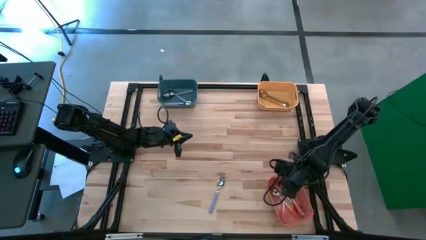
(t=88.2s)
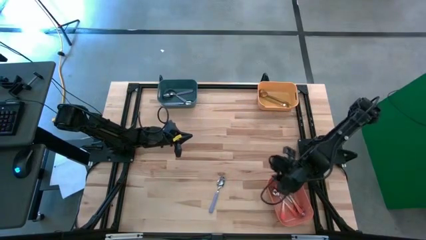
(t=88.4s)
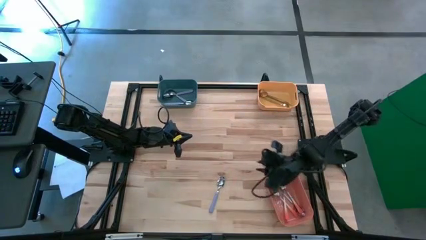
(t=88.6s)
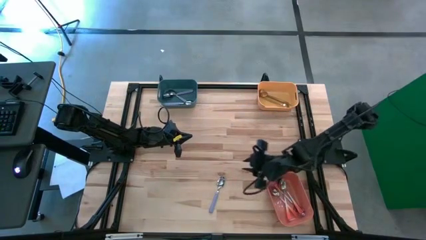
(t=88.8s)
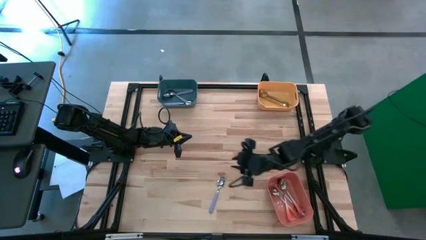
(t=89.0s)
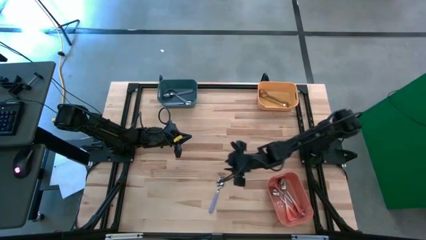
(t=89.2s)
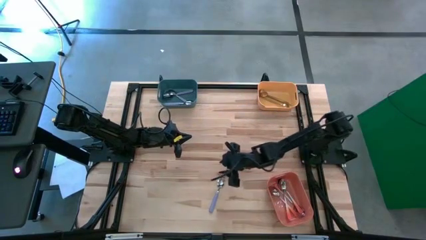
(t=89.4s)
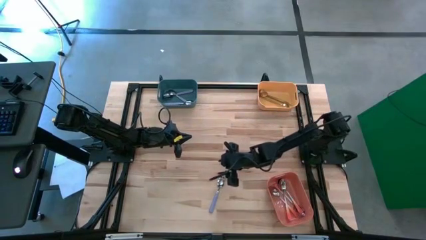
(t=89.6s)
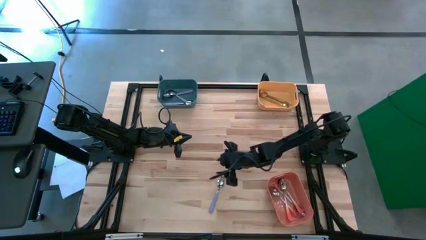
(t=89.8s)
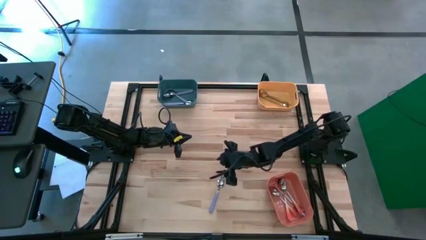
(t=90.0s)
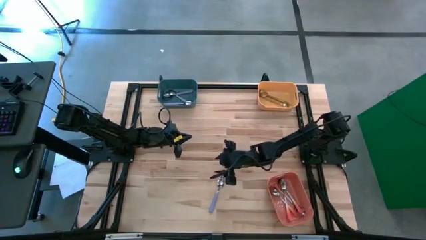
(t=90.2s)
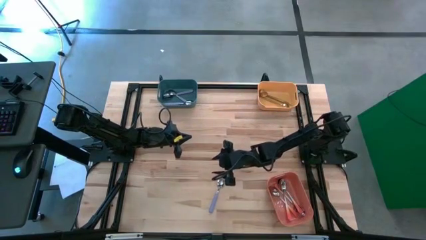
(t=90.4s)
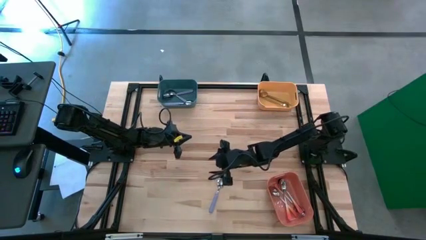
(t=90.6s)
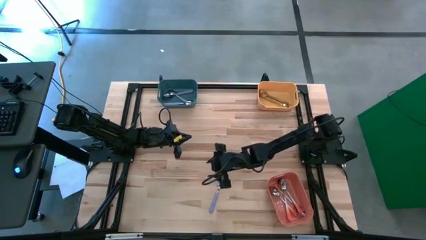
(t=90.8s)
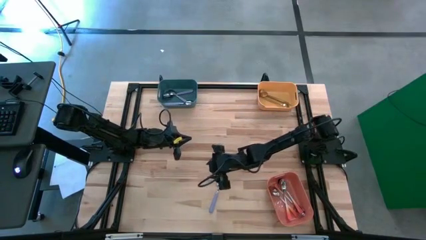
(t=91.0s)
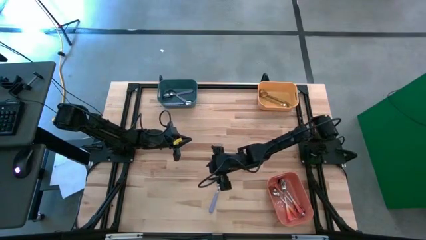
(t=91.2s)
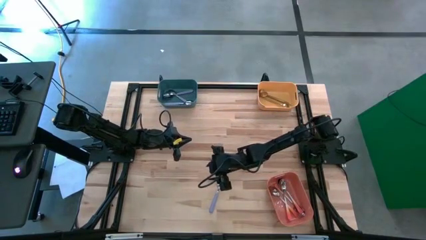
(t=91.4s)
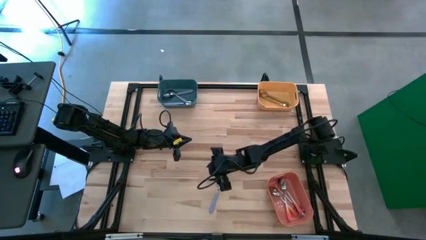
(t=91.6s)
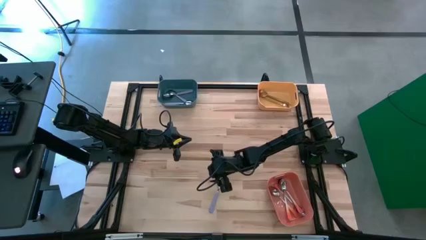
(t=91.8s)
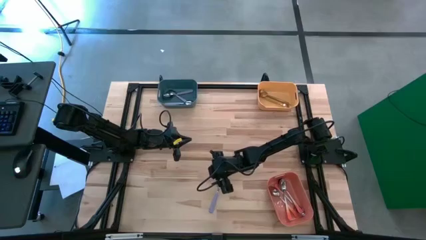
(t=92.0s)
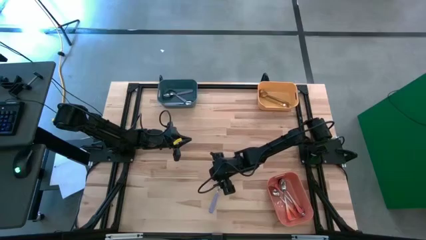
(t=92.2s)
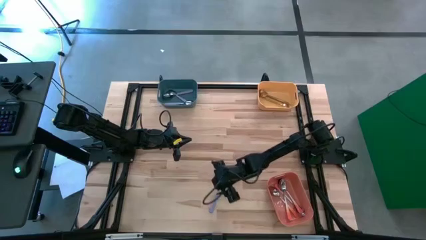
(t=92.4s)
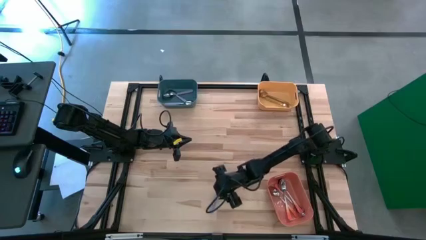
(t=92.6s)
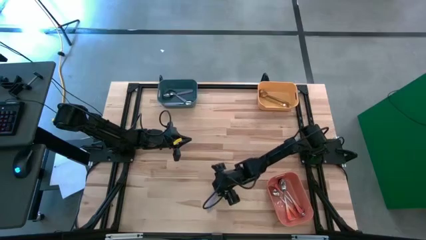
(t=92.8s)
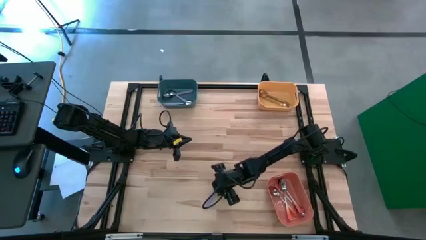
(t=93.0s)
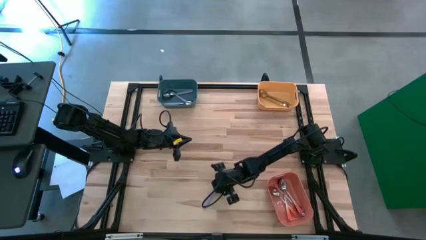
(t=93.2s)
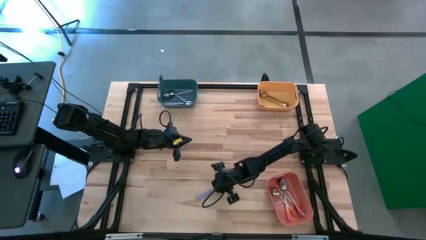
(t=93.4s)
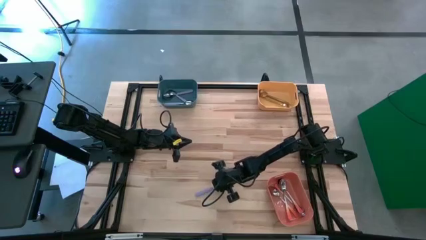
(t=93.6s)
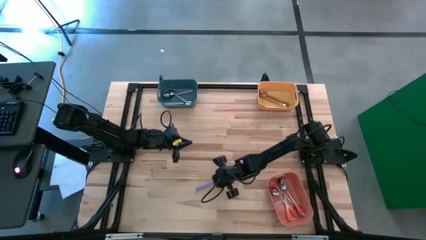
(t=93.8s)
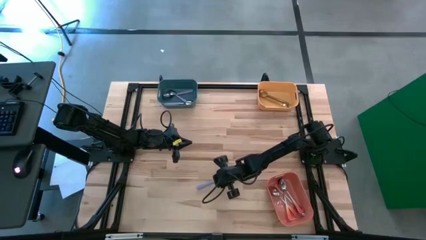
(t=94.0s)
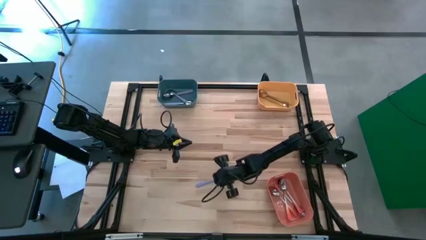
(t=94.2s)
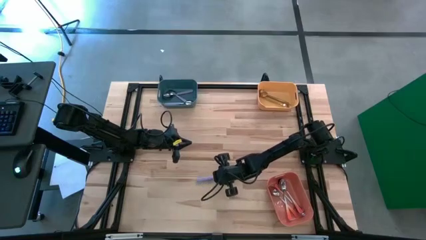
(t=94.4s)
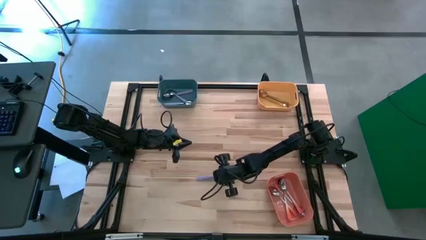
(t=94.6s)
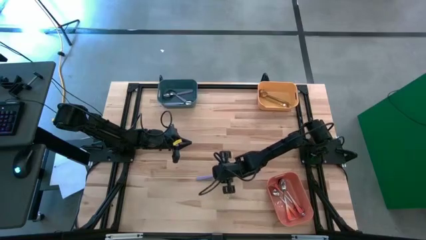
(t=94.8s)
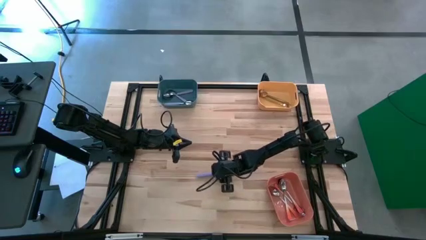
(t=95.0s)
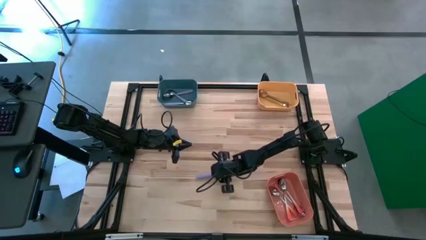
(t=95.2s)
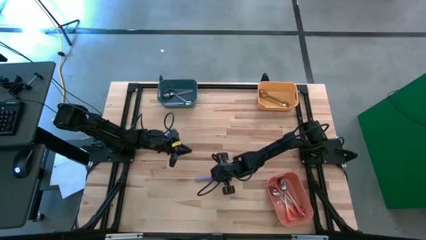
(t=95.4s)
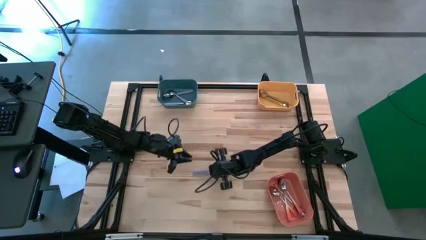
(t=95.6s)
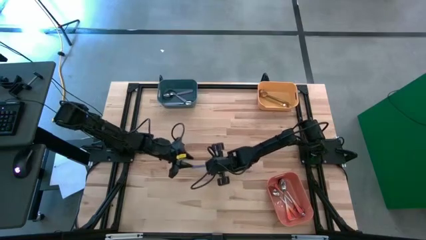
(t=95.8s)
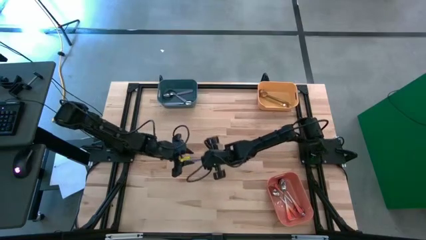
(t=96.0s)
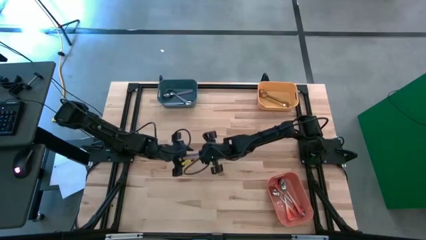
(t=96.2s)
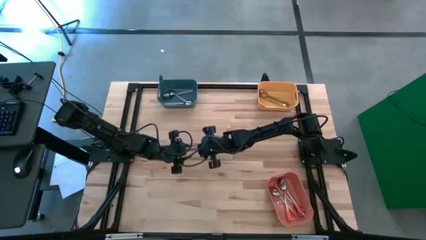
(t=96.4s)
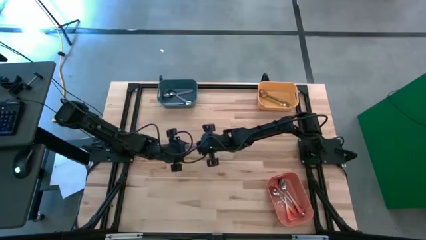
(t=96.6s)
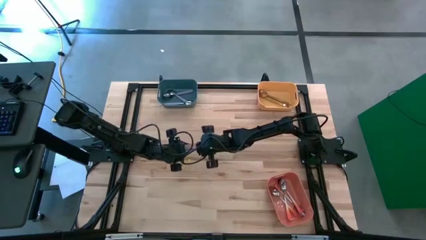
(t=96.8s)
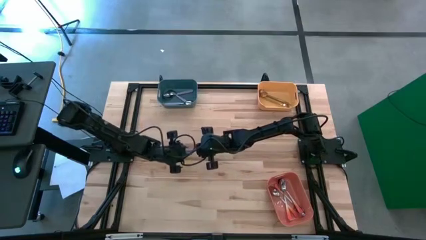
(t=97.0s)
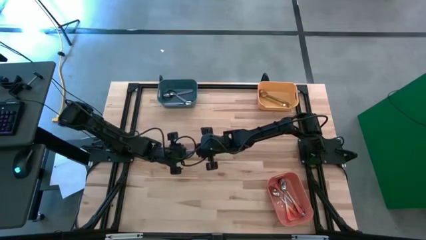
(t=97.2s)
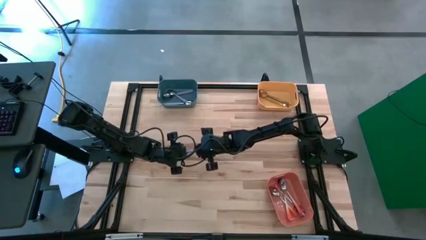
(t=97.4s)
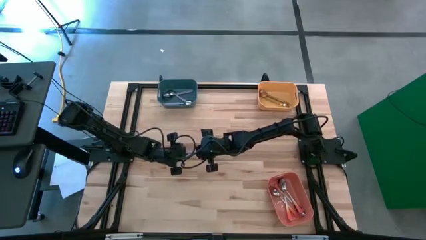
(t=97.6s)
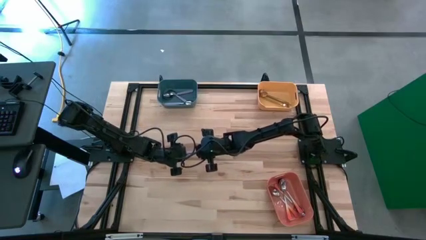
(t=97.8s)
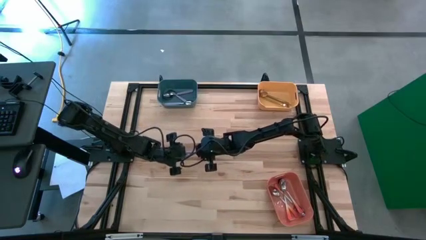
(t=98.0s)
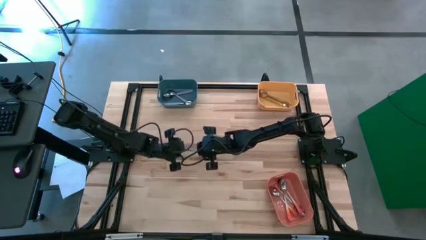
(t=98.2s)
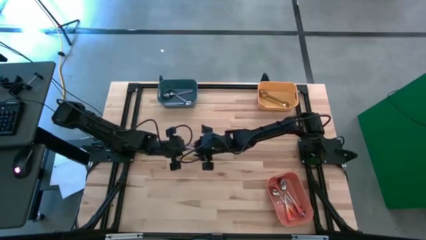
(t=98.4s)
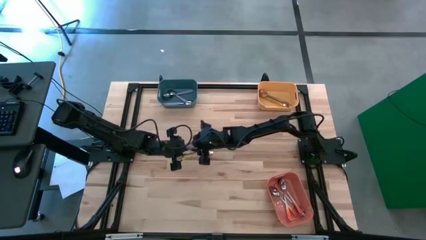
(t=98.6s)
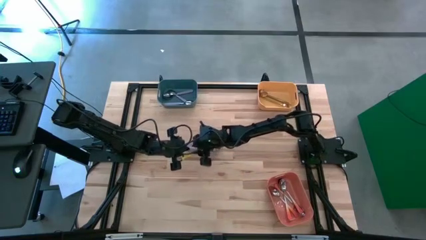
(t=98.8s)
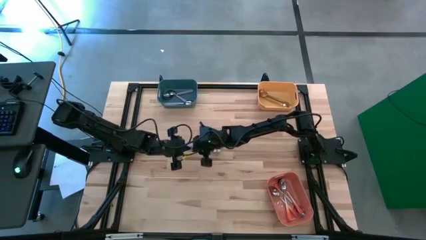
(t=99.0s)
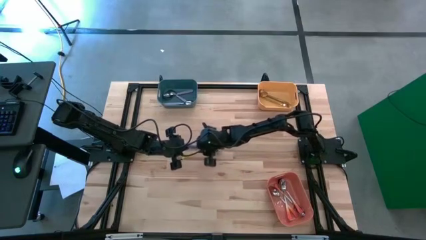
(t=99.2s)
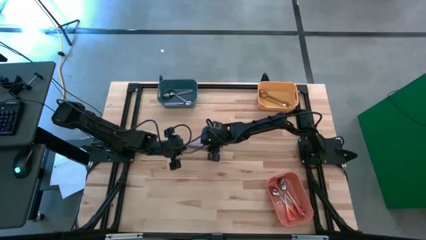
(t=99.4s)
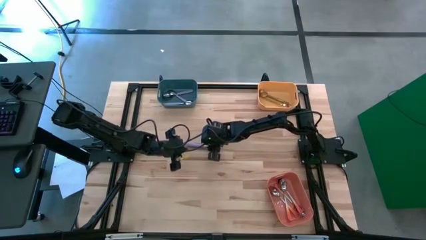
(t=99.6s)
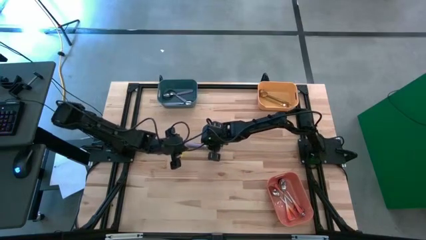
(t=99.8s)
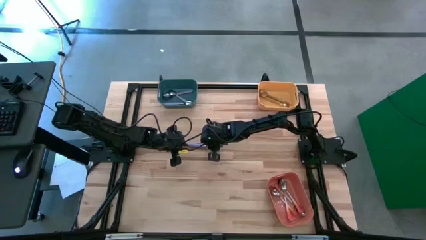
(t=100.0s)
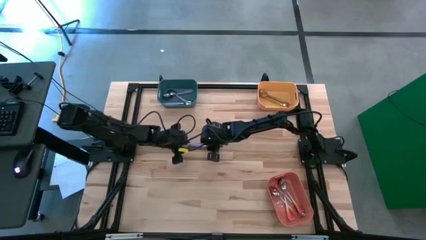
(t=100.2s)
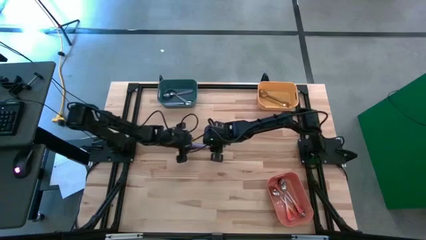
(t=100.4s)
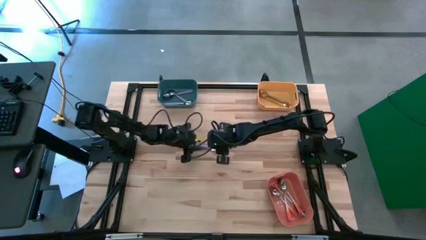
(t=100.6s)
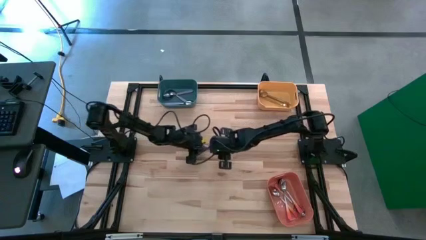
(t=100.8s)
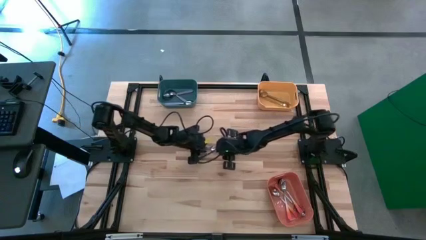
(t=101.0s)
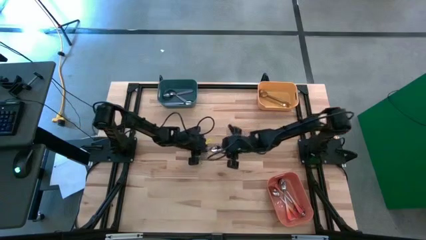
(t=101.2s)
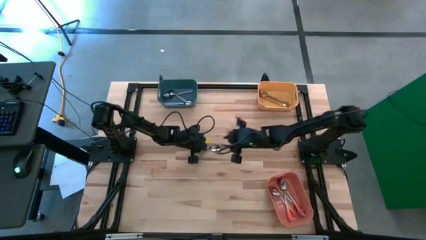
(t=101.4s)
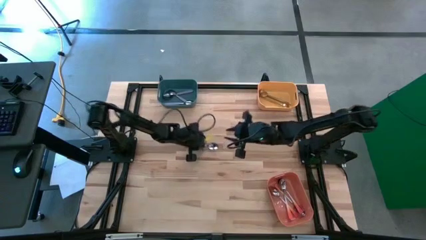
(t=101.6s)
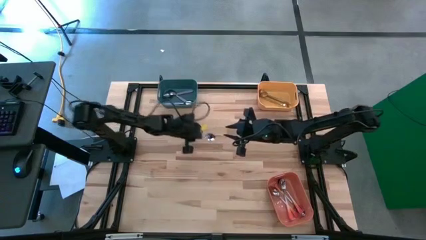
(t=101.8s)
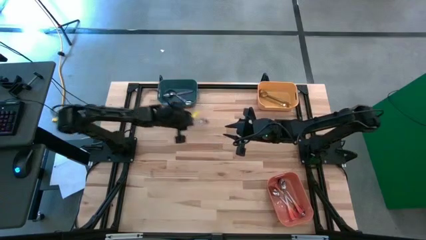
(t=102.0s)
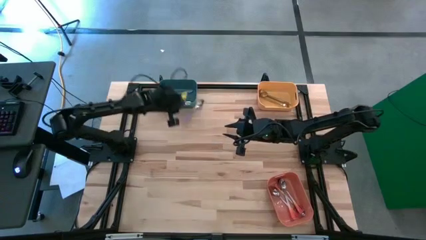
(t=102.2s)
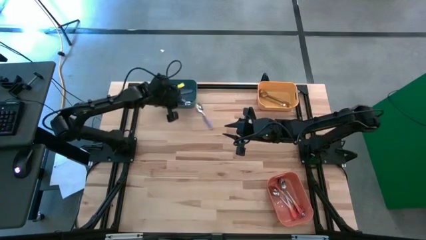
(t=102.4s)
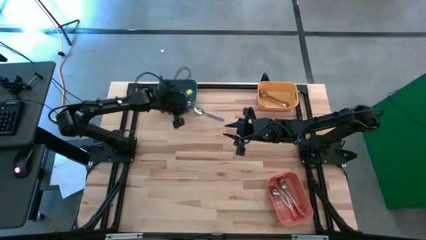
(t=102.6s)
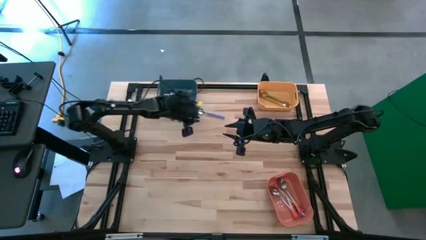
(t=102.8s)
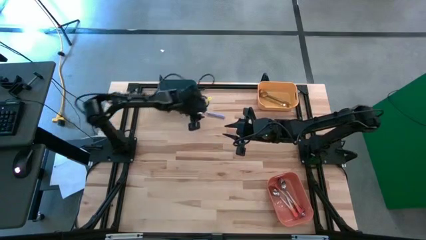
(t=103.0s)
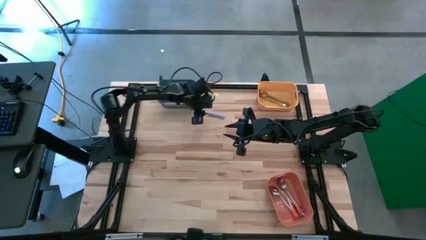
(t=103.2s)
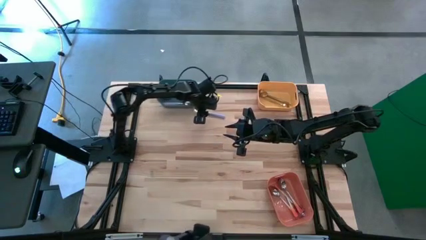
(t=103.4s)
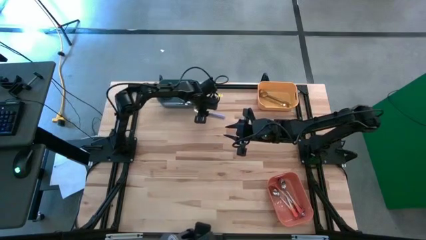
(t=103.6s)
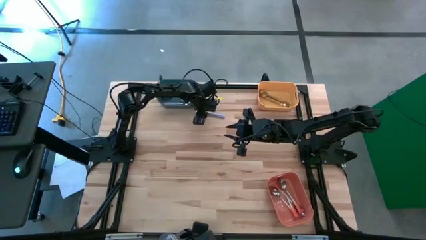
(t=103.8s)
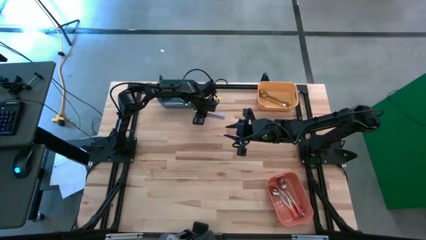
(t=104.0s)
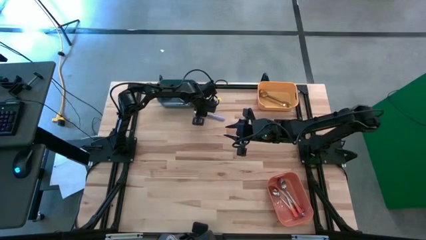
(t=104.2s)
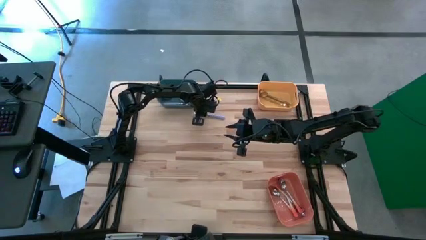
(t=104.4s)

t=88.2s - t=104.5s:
Task: Sort silverware by color (type)
Put the violet spoon into the dark green bin

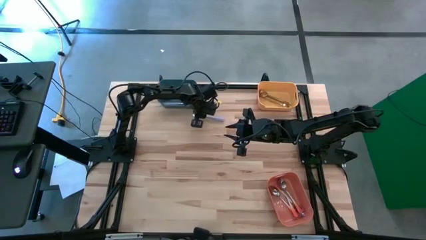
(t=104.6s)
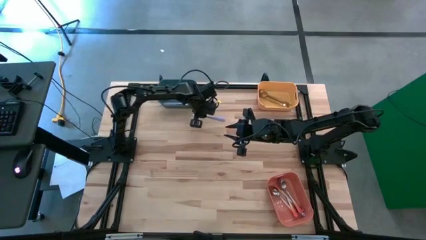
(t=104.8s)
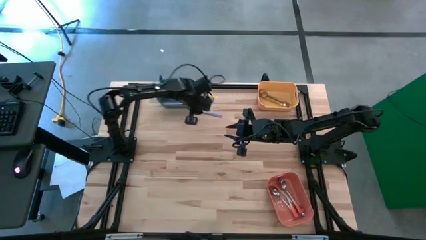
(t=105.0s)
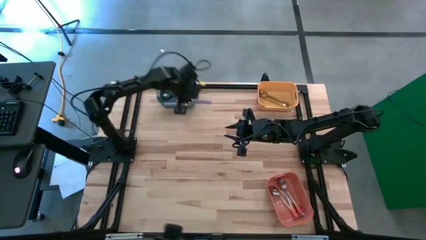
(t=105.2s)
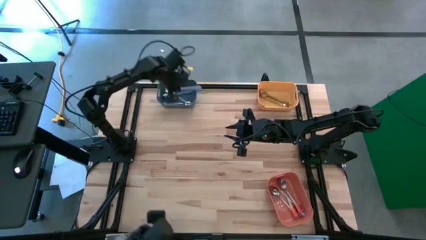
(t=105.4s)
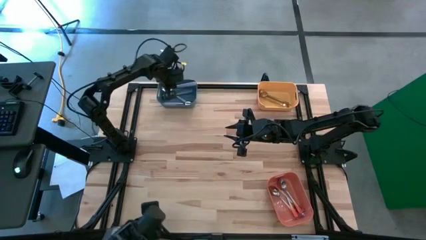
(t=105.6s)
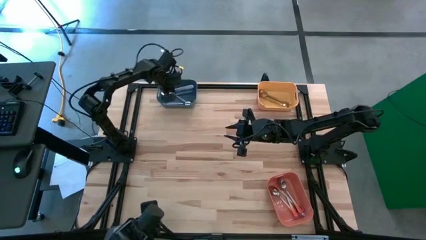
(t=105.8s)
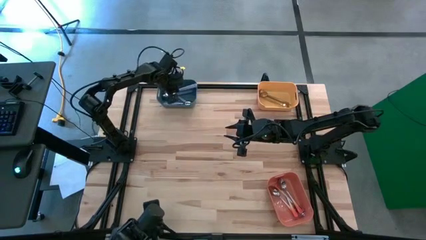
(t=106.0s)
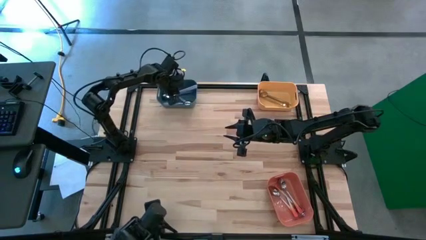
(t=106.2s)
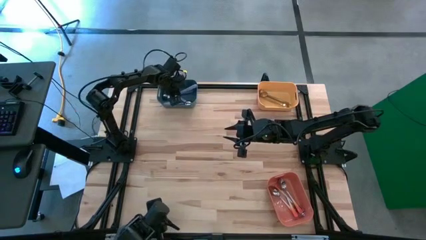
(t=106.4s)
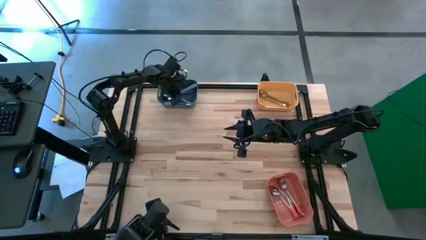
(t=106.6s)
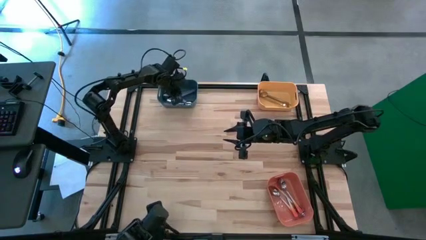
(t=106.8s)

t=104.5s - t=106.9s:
Put the violet spoon into the dark green bin
